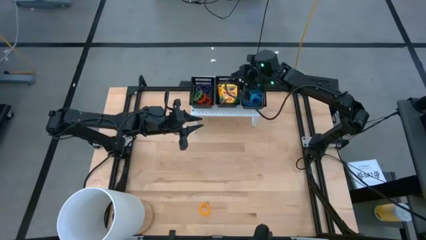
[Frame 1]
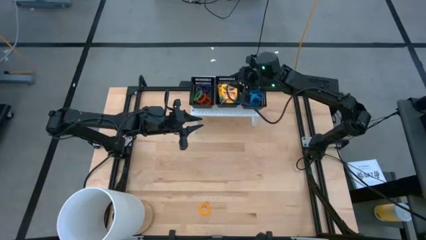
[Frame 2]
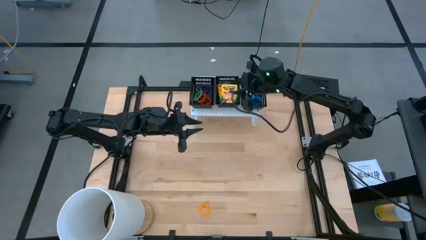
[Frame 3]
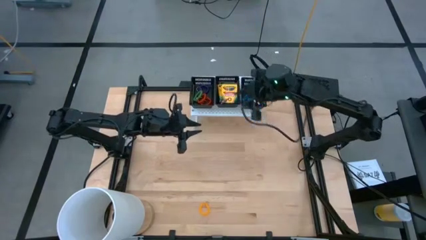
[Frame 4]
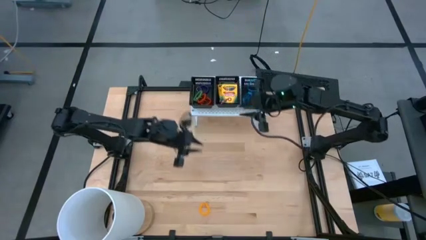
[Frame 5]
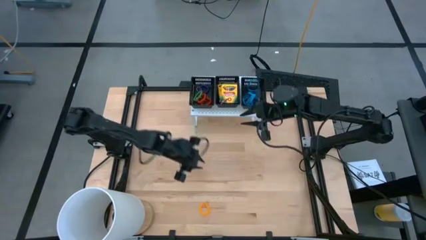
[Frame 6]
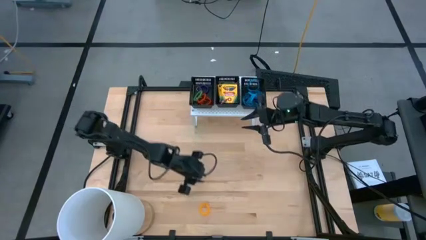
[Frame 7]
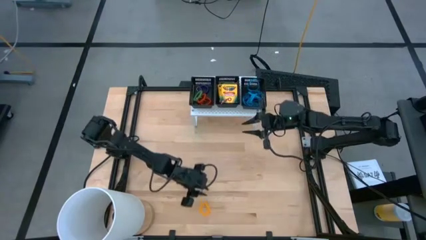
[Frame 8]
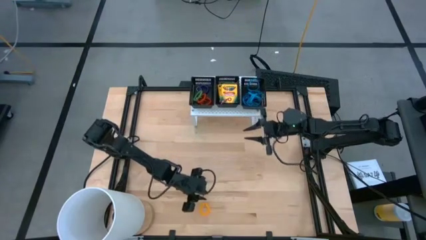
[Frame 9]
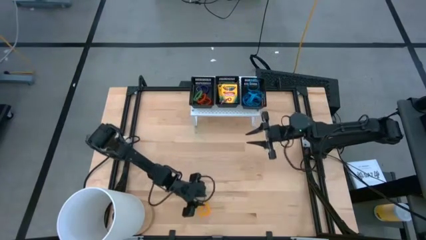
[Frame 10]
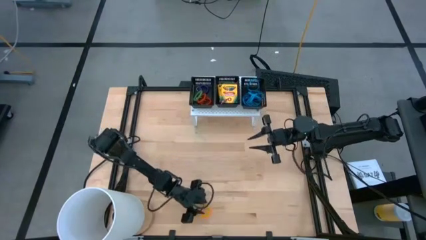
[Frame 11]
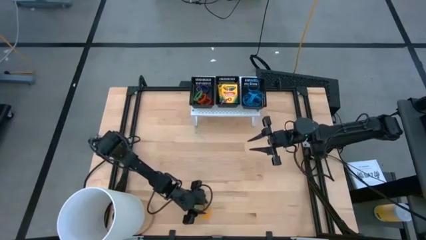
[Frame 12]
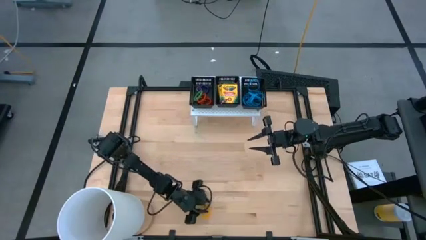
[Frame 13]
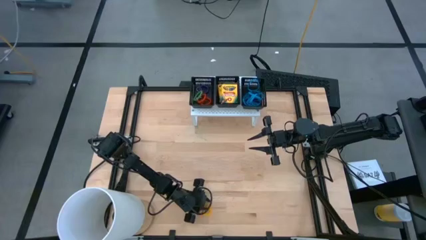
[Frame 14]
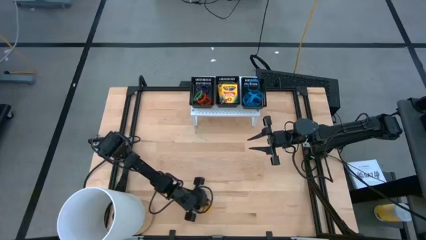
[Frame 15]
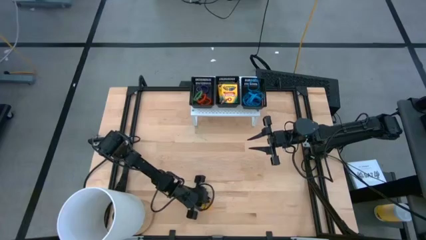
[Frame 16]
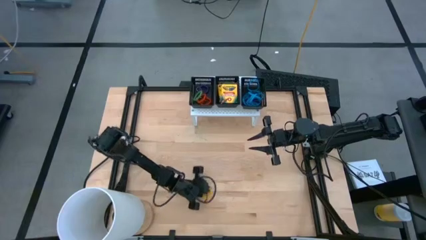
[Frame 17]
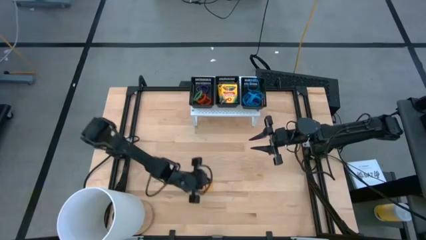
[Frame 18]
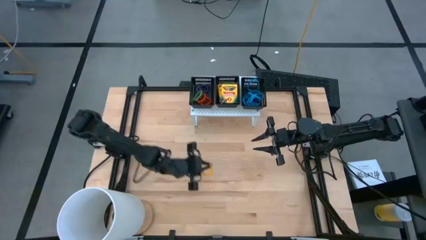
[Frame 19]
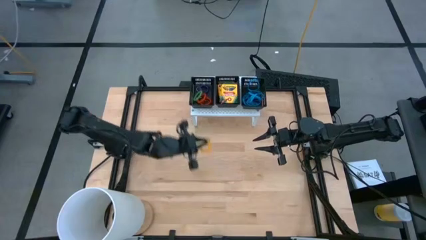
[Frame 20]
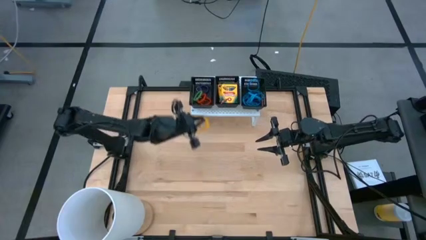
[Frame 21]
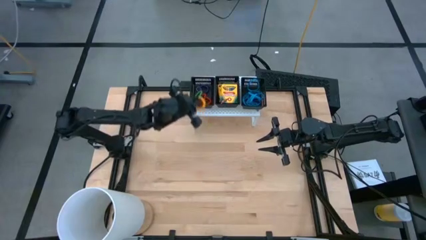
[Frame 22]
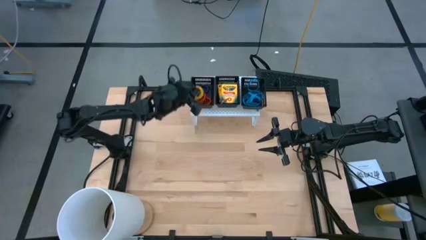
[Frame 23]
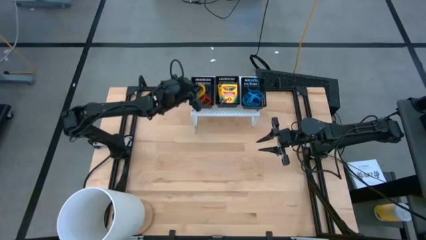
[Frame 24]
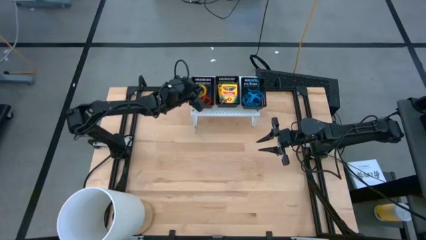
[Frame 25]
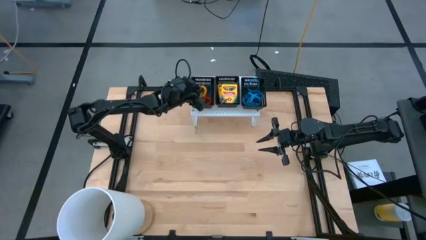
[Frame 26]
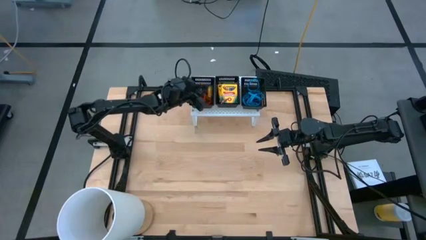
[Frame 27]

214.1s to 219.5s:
Task: Pick & Place Office Desk Supplies
Put the yellow spring keychain into the left black bin on the shelf

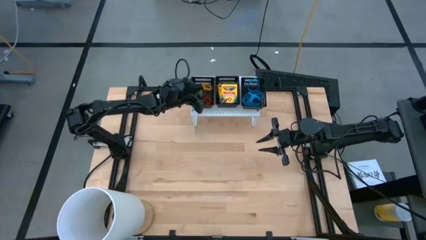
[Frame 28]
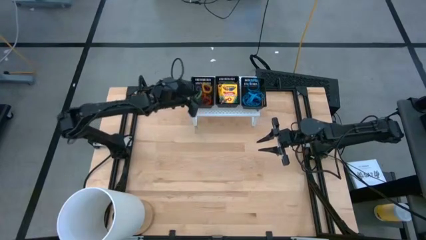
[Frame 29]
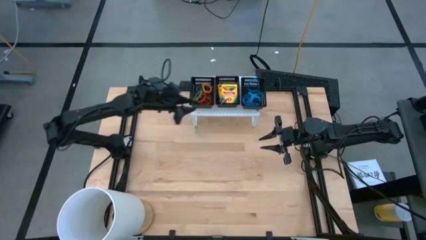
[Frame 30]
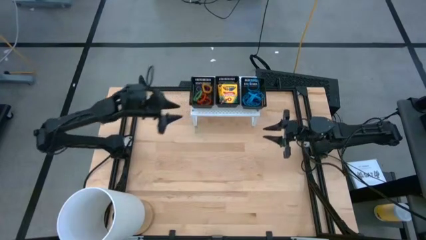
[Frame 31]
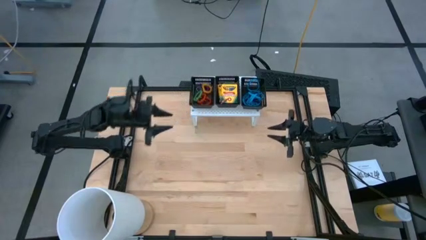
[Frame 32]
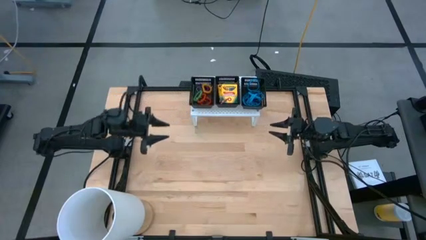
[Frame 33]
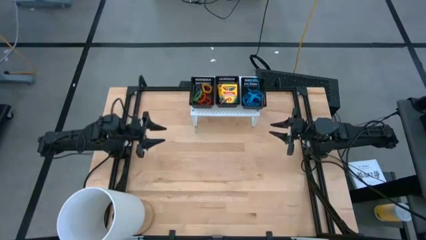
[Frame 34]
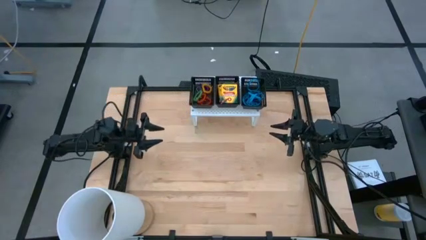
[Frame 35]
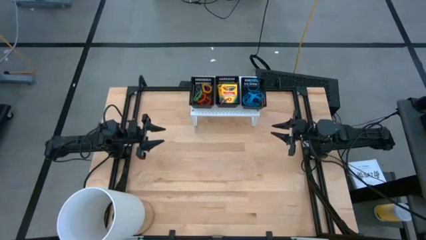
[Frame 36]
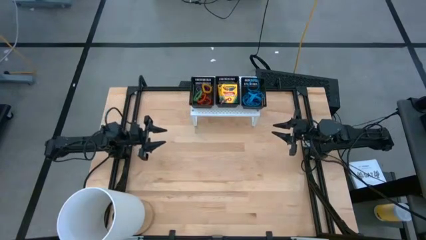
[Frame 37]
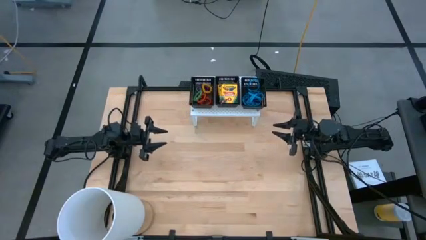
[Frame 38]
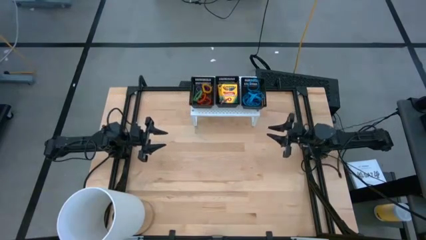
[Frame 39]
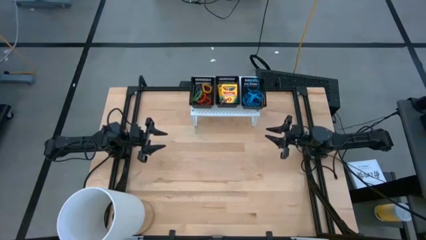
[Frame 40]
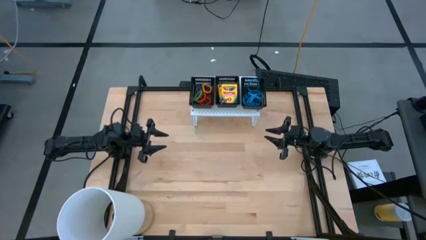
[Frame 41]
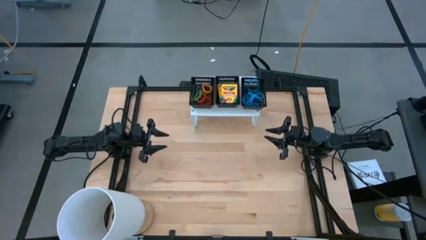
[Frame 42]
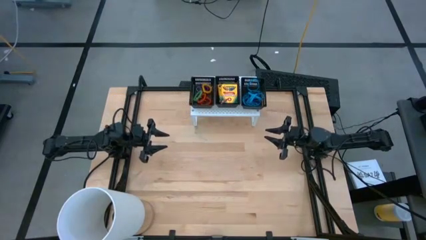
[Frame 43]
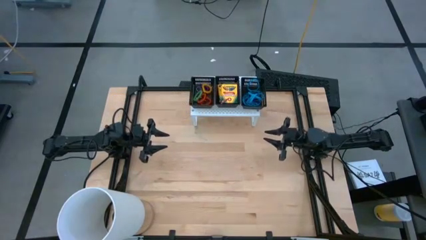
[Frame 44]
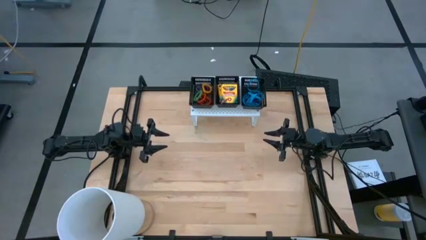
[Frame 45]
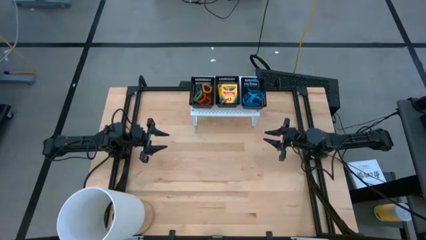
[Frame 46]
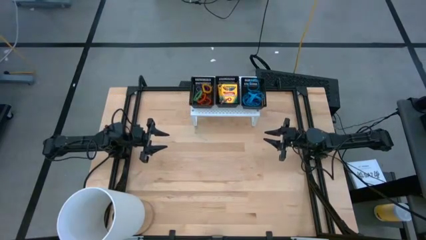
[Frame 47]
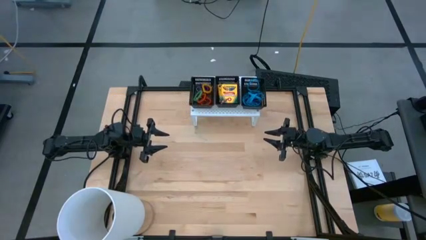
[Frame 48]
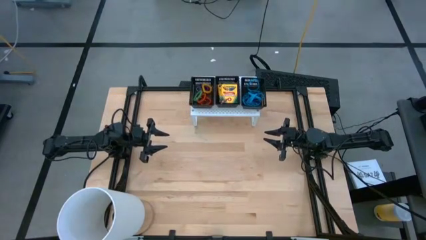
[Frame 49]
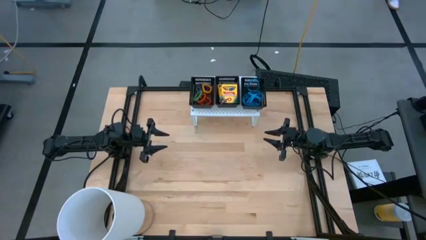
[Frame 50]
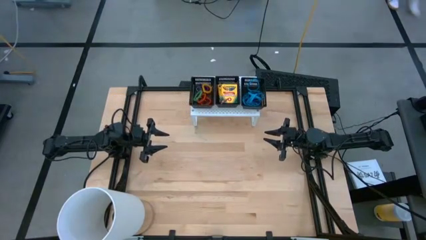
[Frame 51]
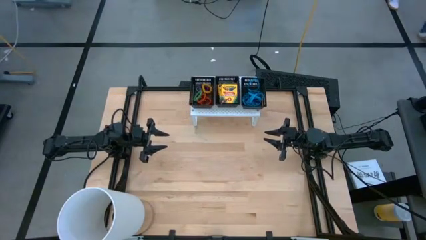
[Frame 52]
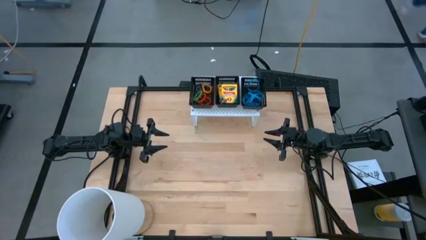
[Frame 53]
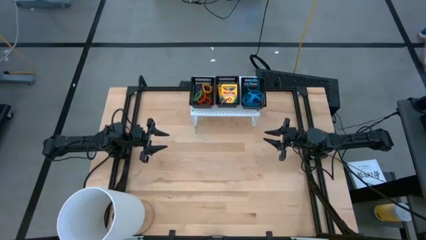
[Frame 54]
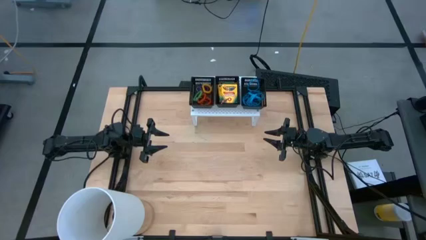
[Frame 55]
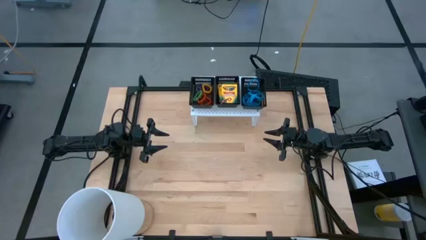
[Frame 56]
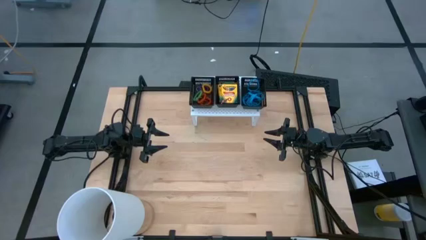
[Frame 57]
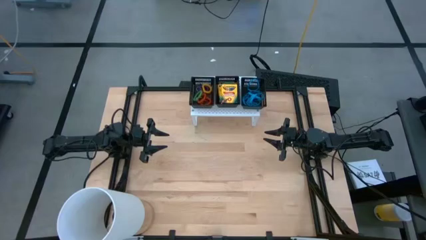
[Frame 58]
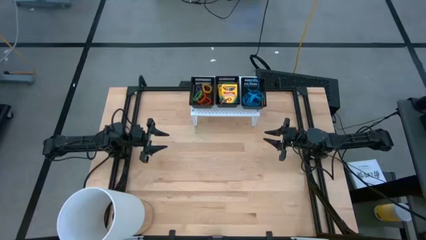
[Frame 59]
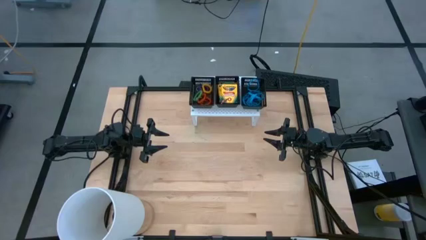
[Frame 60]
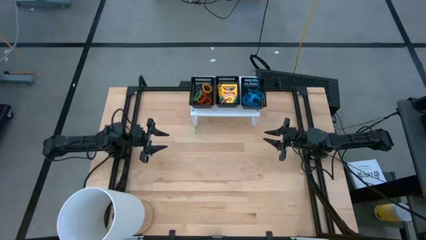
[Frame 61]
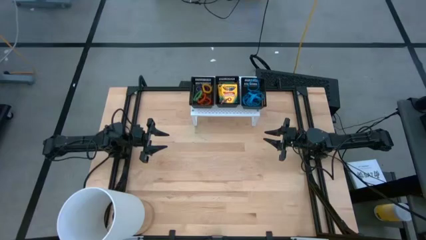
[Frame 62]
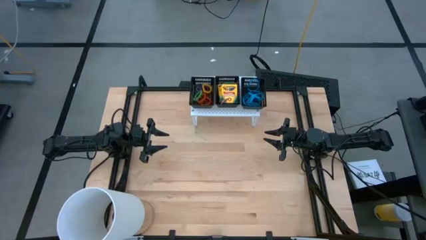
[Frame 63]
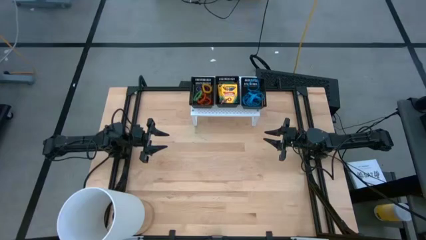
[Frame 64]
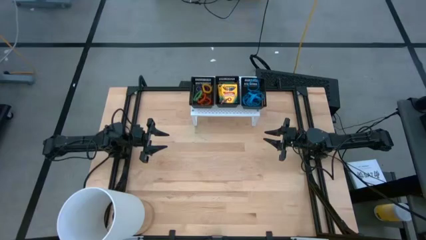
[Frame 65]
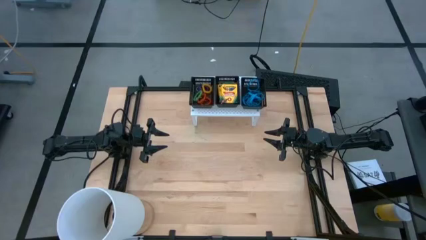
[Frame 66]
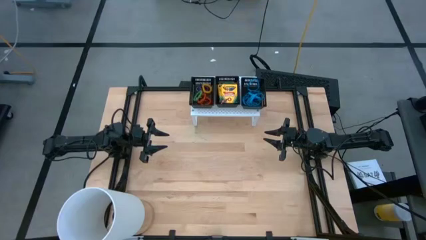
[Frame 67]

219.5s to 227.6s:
Return to Home Position

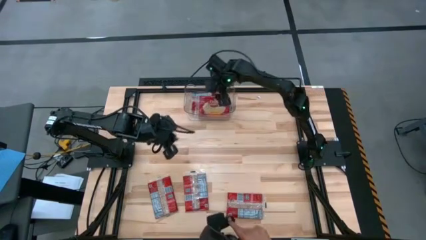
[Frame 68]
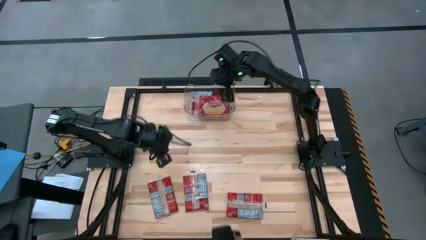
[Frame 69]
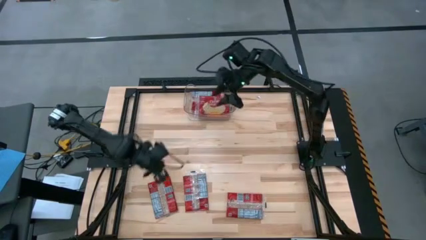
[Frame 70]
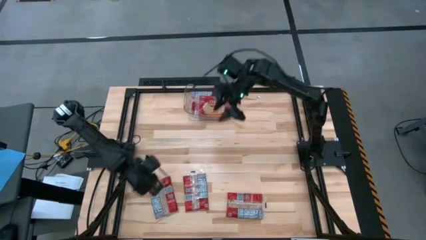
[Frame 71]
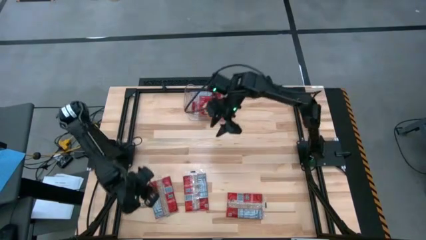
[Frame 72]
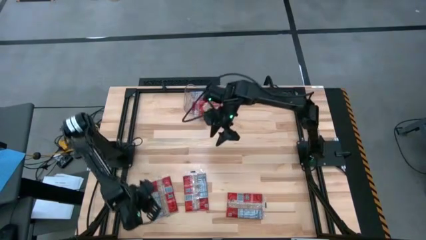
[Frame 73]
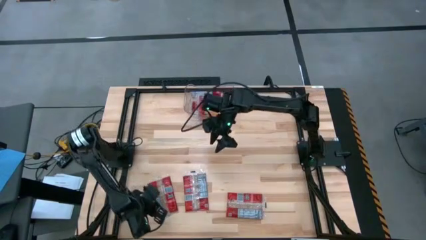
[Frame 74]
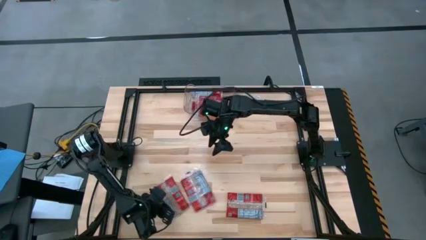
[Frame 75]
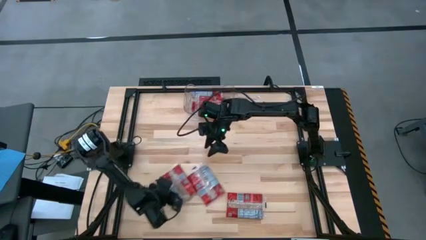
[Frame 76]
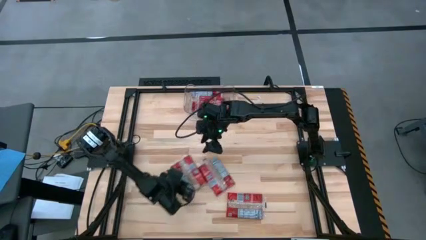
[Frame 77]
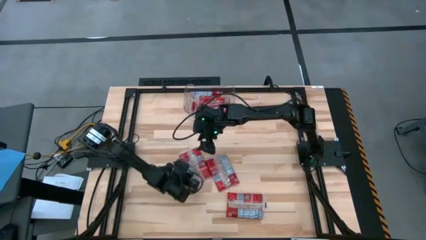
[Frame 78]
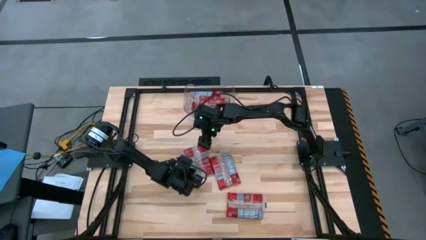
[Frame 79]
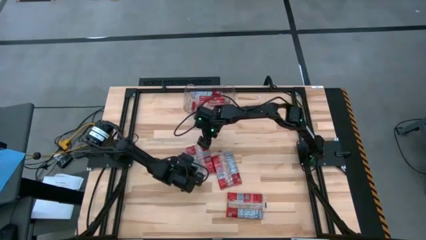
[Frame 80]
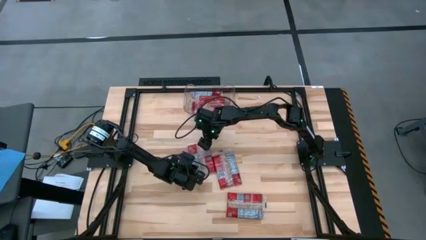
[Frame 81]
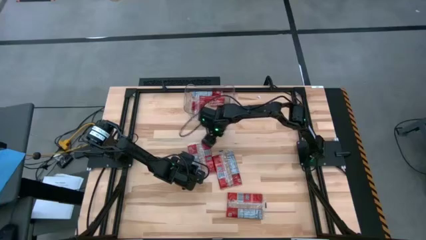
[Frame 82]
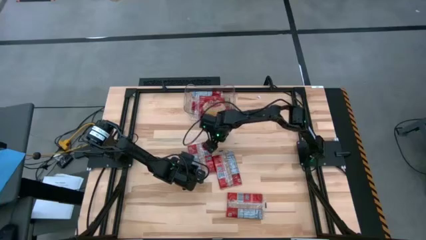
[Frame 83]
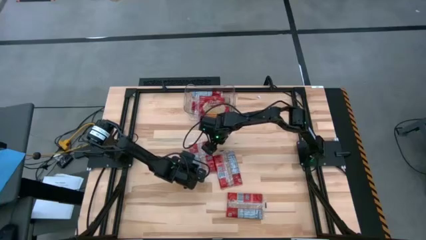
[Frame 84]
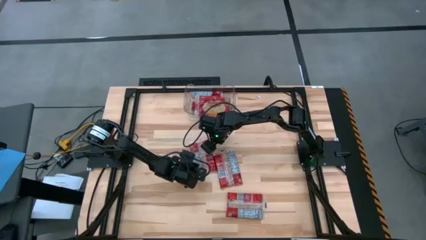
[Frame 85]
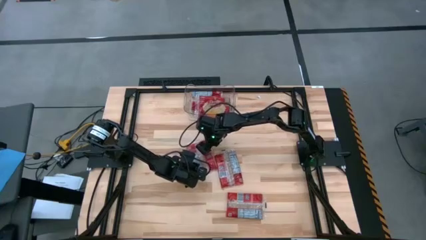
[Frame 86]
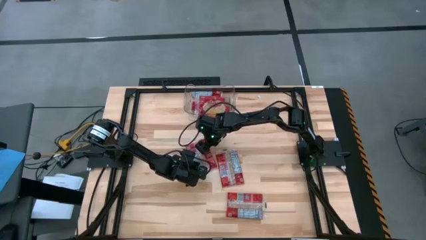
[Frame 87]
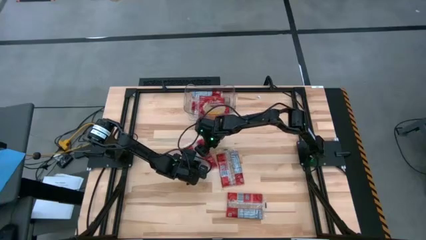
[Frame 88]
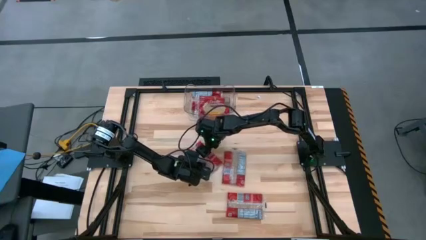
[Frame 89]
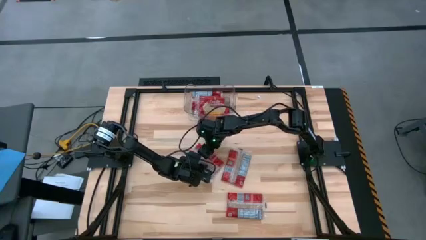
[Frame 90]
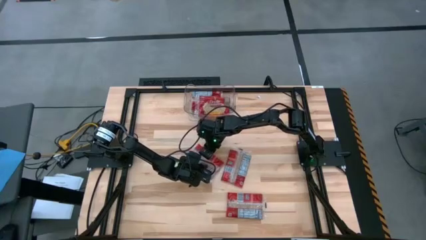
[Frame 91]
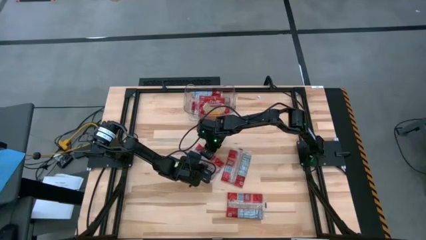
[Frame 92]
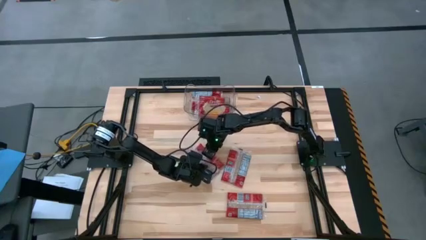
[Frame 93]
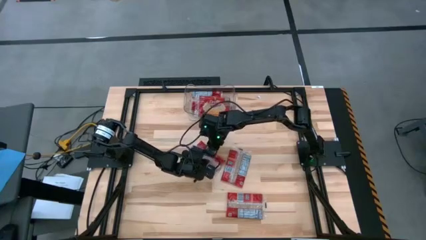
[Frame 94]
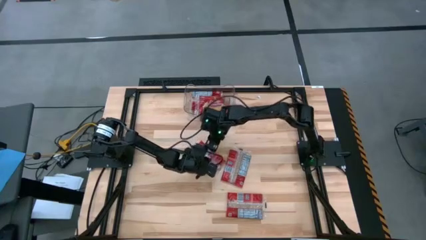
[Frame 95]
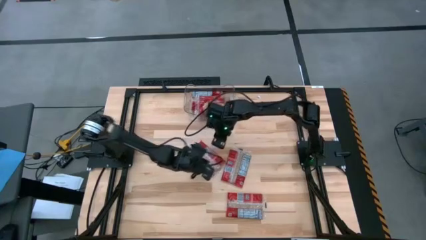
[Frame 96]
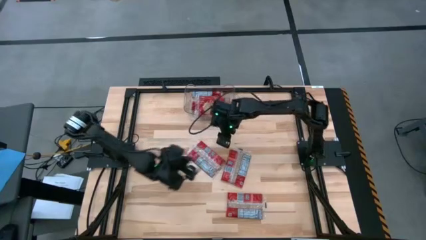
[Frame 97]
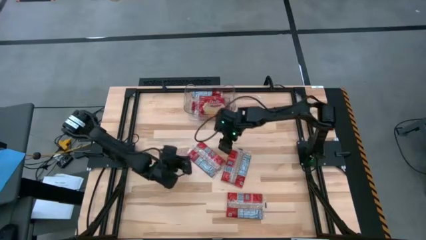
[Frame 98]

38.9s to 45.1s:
Task: Sort popcorn bags into baskets
Put the red popcorn pack into the transparent bin
